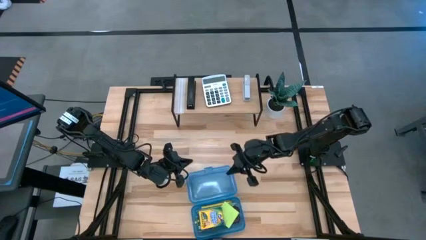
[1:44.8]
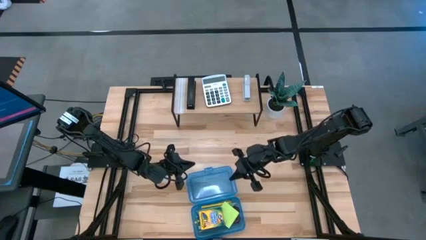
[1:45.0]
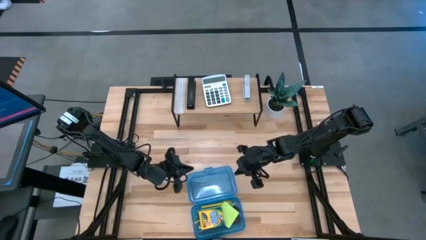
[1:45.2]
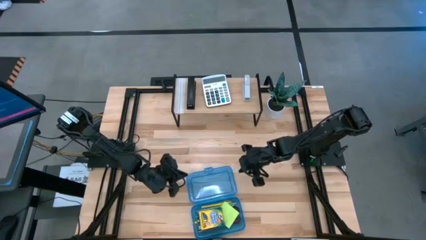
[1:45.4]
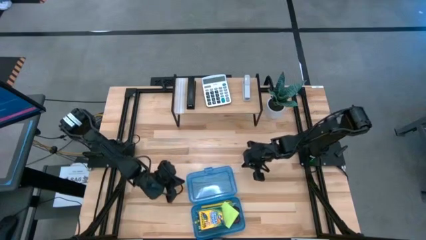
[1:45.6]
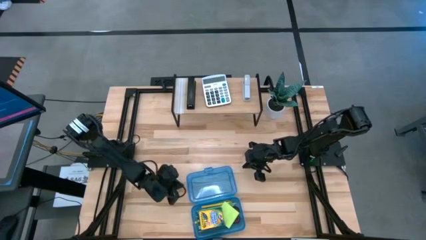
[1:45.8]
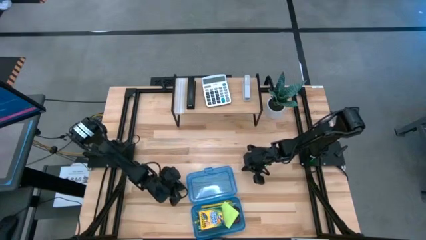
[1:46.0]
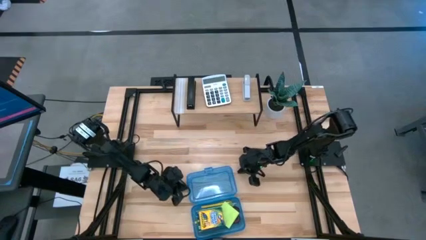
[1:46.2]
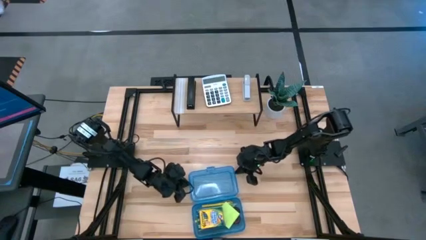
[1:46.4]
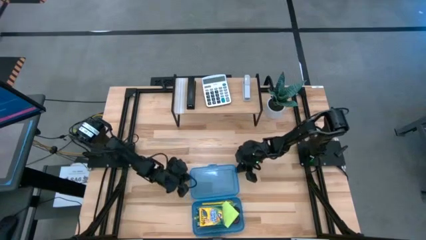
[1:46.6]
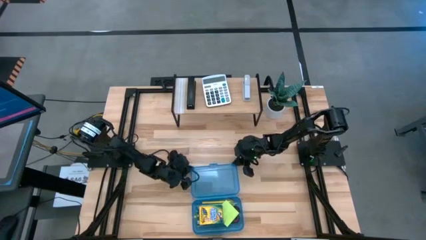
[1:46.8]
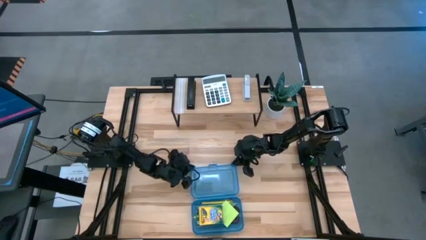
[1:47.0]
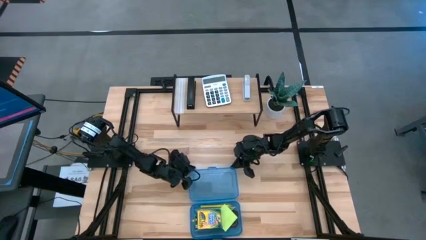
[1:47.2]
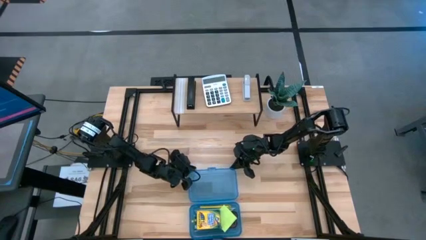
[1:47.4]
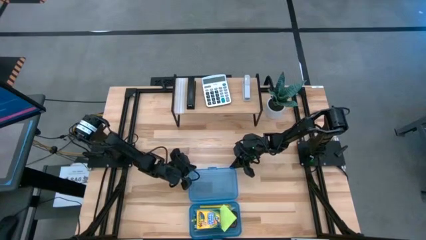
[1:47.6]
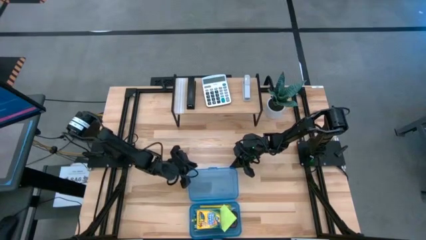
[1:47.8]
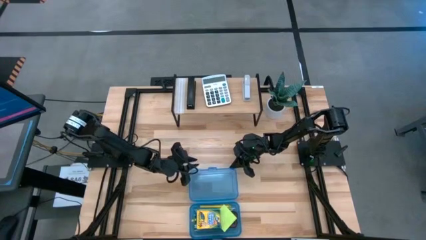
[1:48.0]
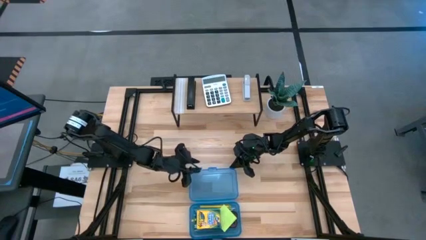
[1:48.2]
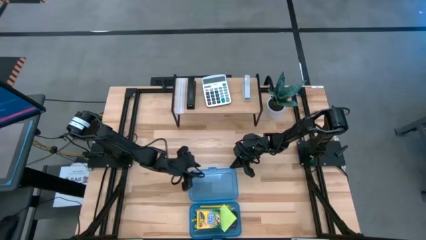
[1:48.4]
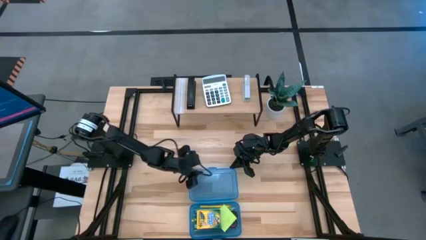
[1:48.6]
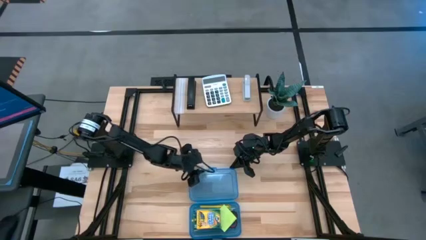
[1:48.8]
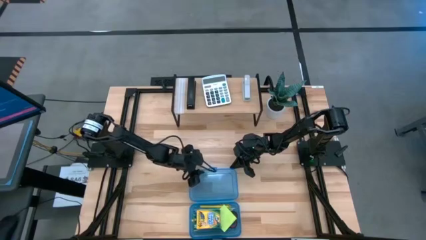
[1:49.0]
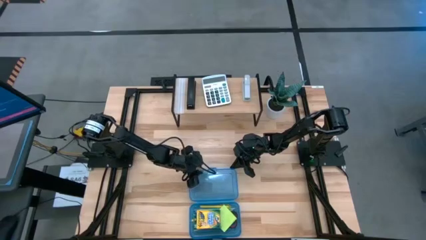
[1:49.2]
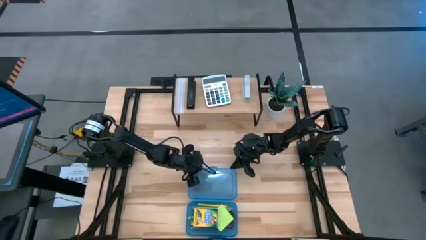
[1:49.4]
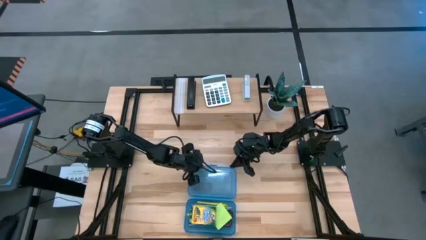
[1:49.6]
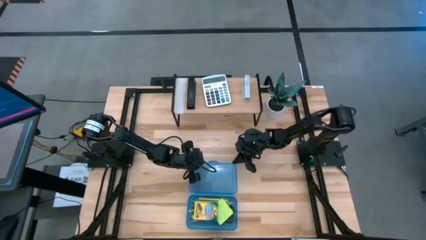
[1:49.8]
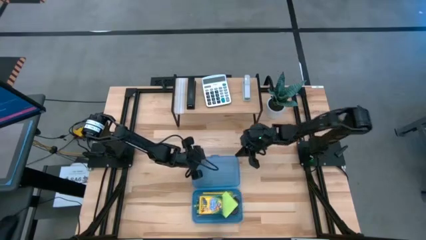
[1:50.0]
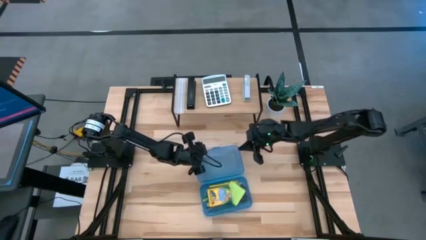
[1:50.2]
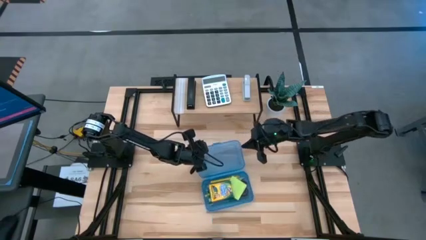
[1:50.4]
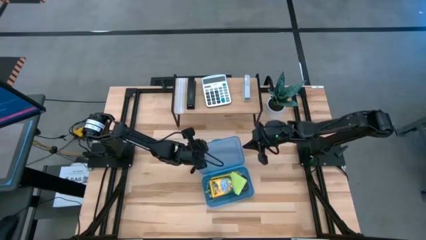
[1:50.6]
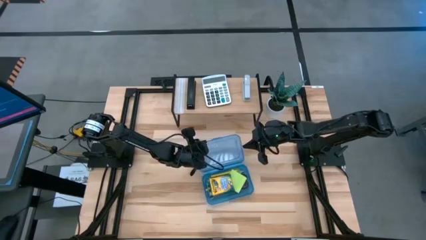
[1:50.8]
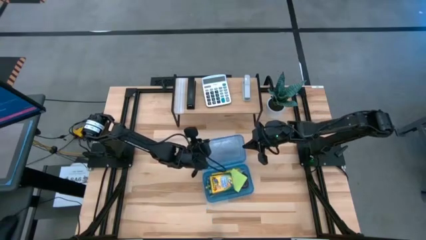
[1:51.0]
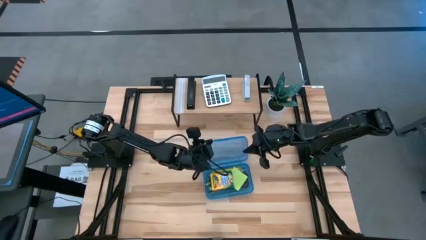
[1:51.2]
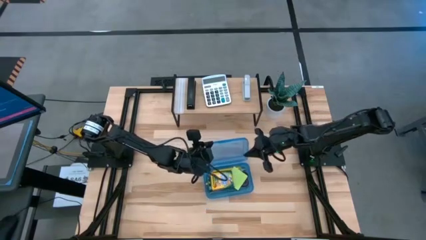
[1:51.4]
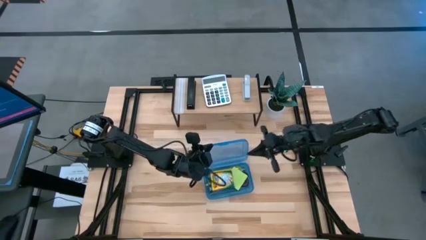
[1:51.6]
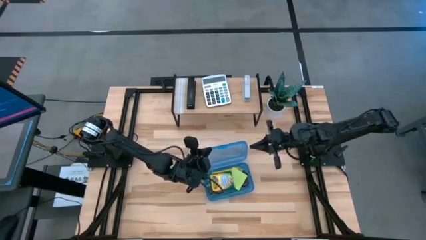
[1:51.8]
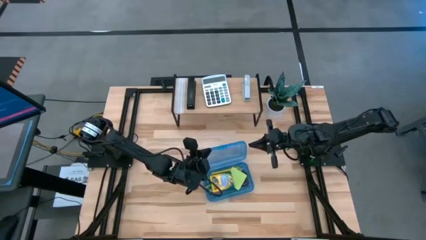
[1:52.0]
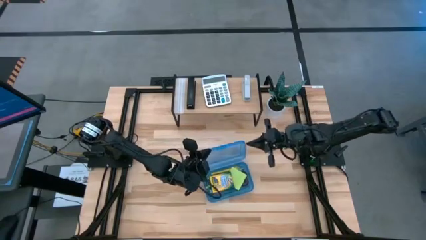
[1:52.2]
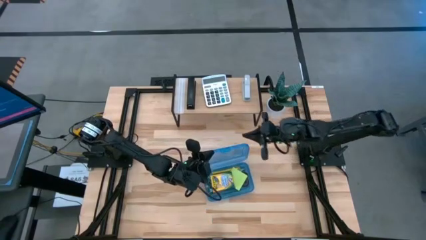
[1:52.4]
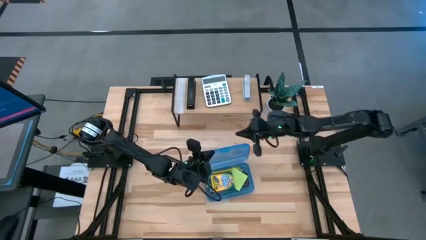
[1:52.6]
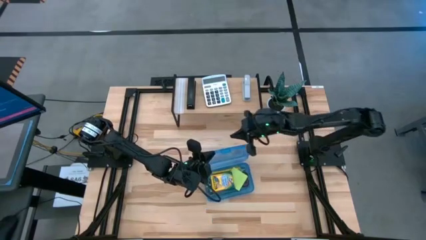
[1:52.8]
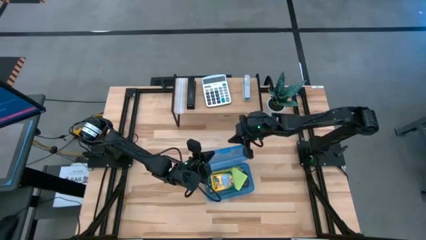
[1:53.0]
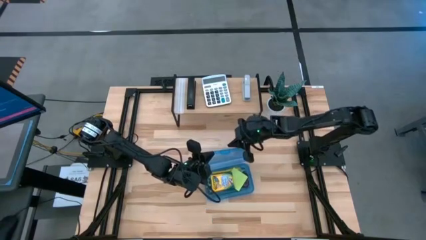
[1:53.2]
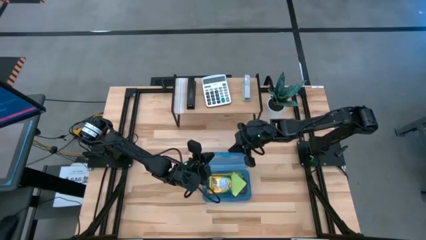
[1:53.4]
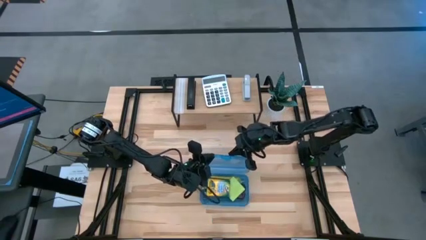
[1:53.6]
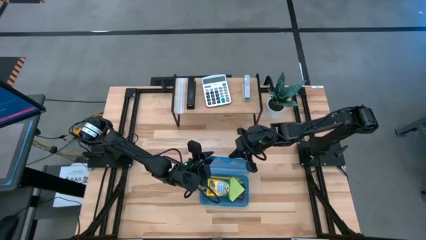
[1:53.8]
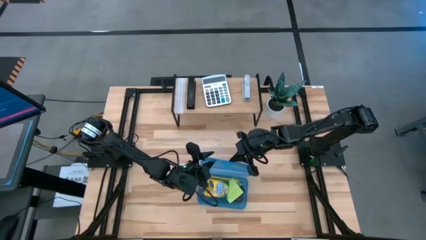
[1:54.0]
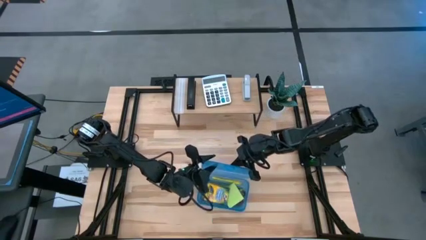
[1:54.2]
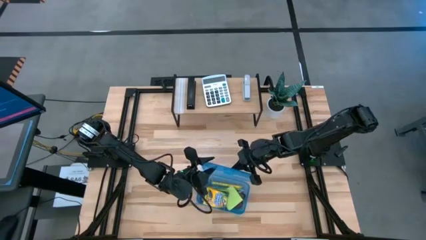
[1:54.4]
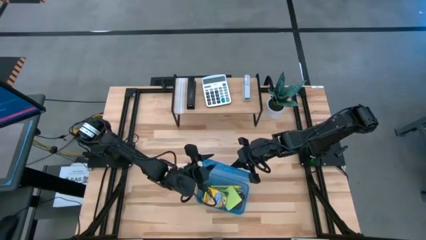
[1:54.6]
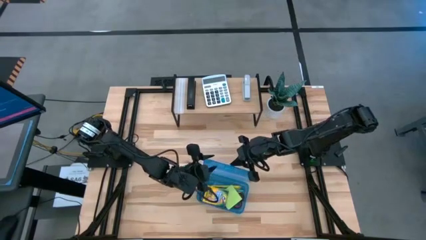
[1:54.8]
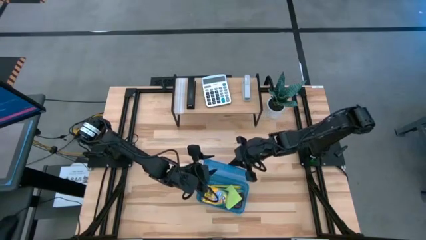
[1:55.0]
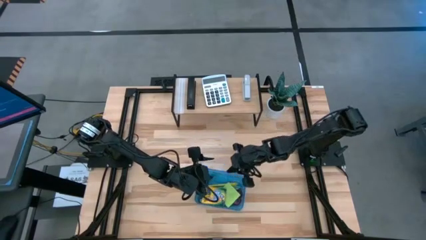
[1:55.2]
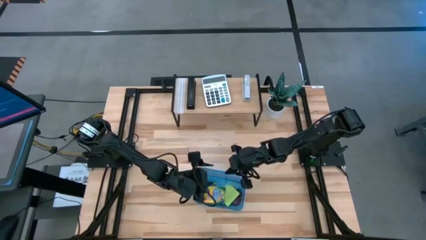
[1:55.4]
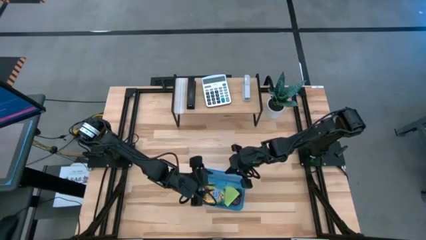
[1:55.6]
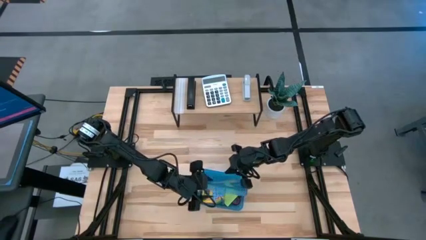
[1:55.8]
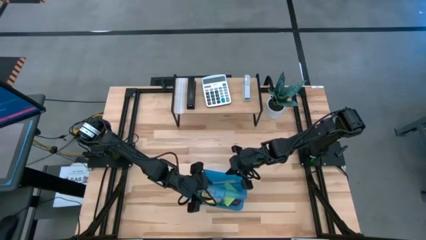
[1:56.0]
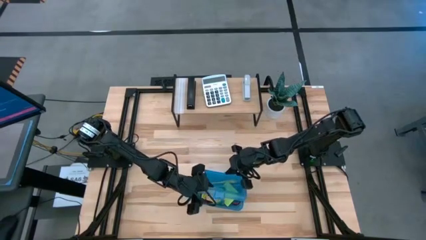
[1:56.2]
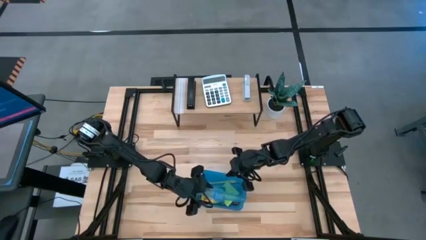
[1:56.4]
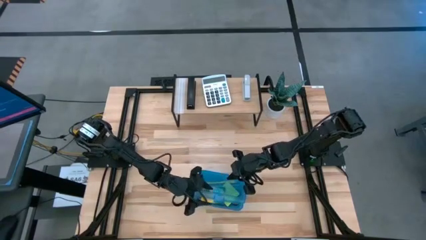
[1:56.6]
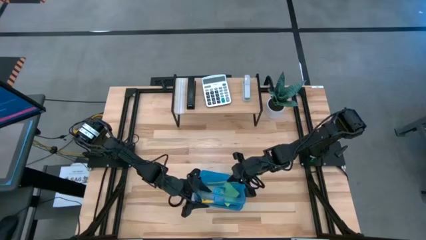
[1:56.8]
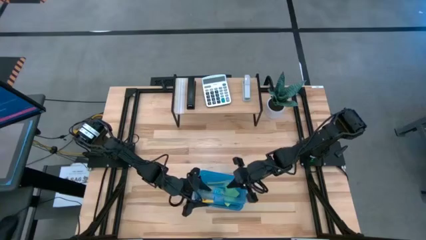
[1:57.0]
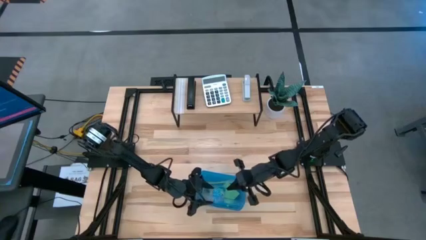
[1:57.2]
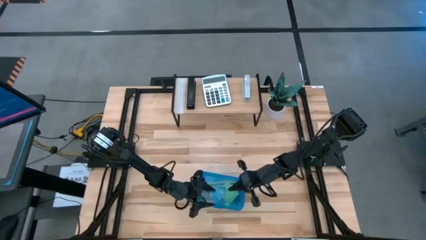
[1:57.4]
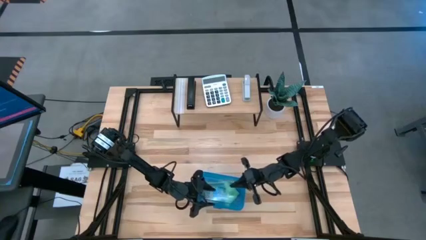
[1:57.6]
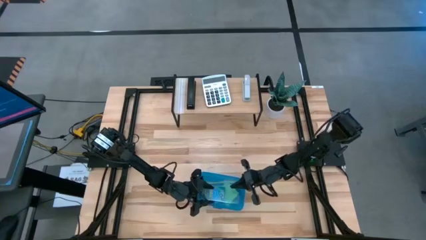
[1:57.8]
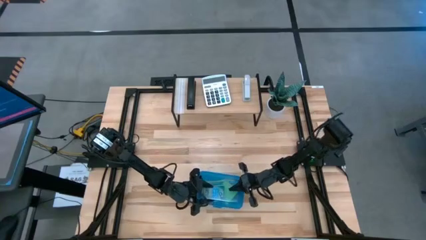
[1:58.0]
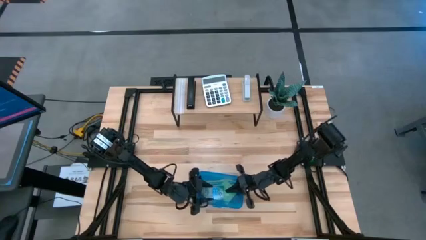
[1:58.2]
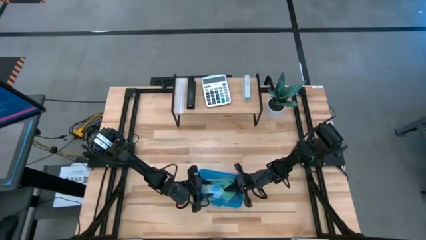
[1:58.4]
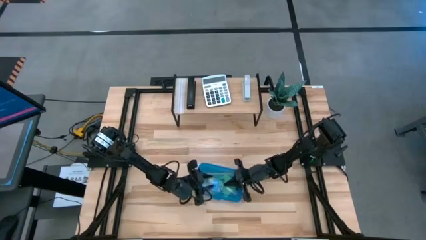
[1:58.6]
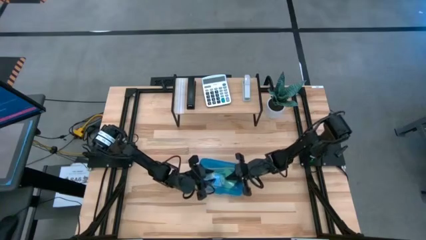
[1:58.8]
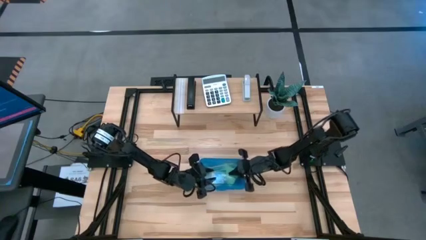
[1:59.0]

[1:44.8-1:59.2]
Task: Pack school essentials
Close the blue supply box

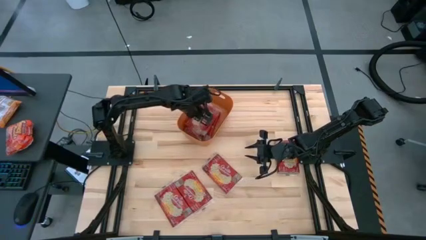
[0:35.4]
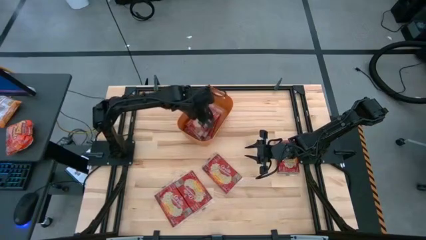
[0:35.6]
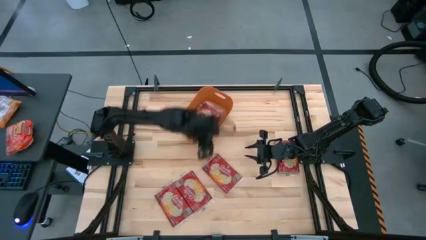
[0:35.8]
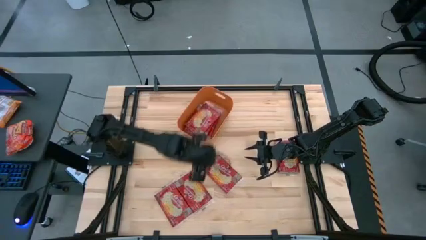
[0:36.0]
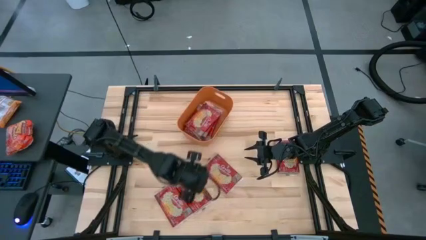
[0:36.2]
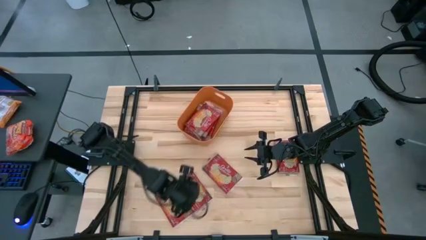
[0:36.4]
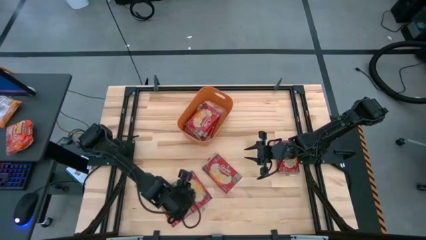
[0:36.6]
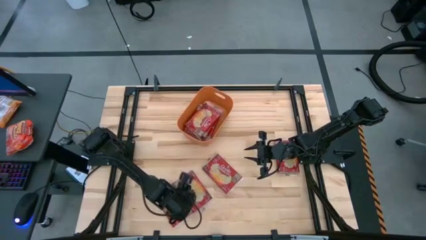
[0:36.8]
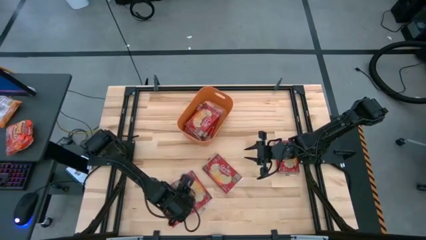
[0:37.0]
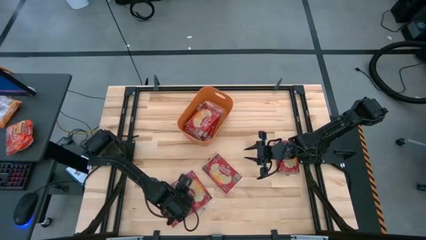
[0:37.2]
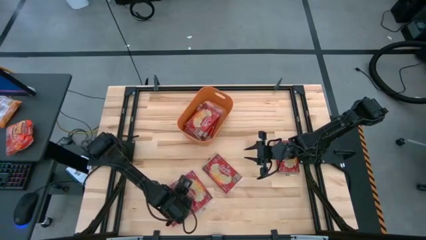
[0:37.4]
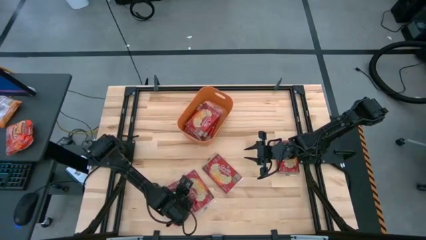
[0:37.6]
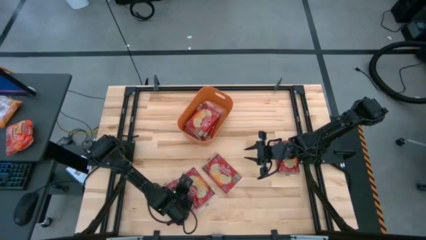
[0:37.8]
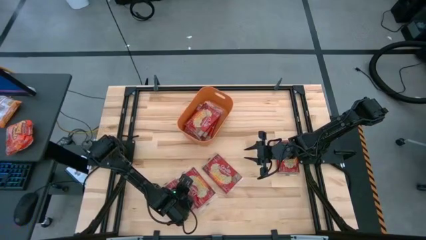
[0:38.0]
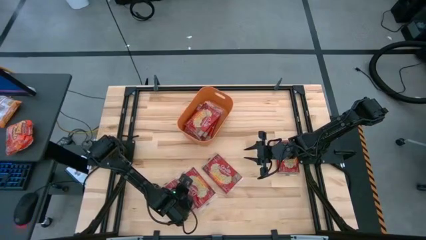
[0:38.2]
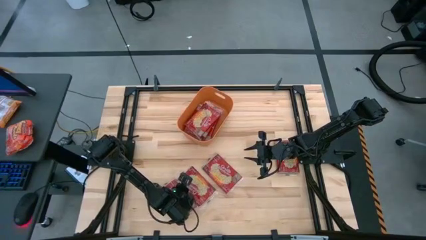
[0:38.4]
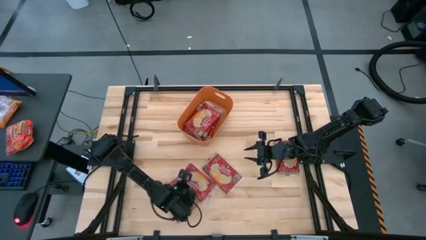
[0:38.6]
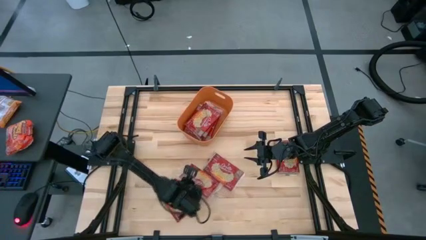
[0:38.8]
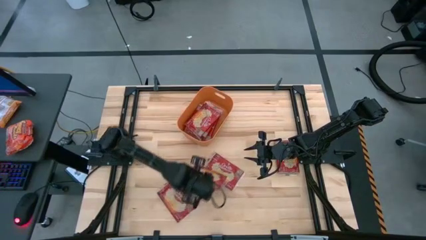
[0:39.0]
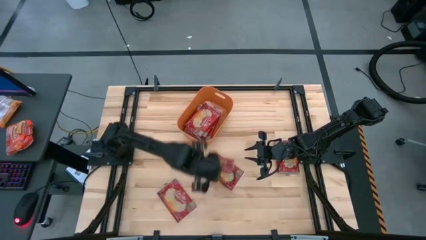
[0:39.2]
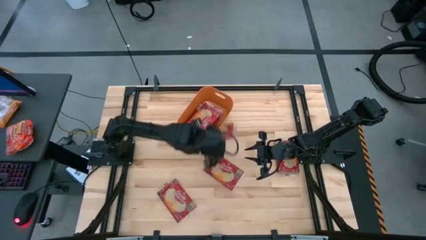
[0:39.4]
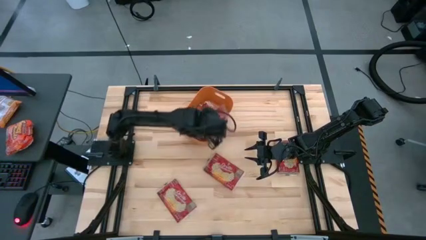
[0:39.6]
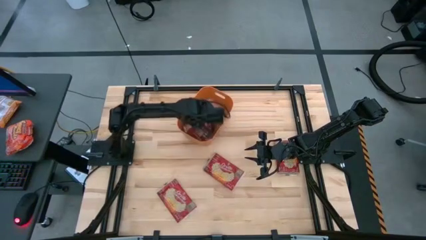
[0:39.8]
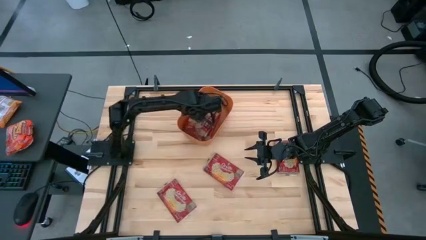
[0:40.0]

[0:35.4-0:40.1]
Task: Sort popcorn bags into baskets
Put the red popcorn bag into the orange bin
